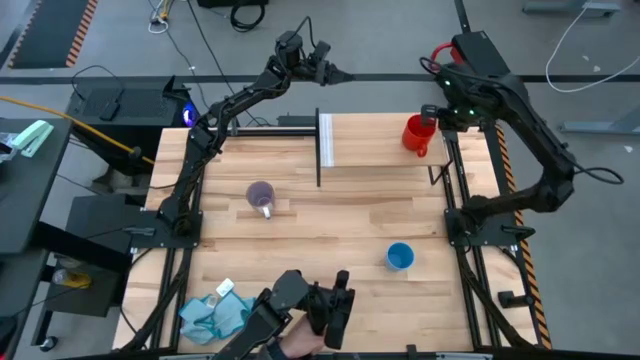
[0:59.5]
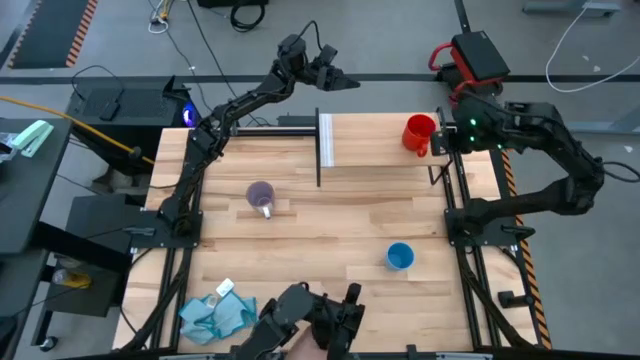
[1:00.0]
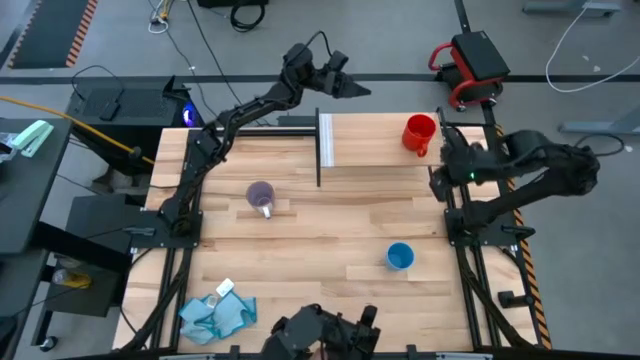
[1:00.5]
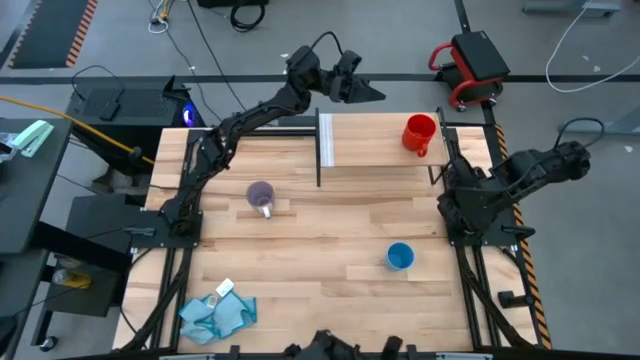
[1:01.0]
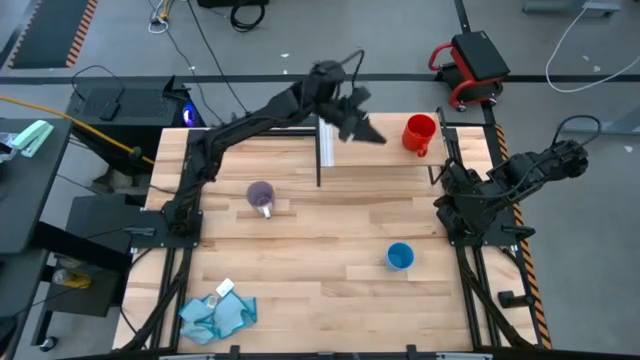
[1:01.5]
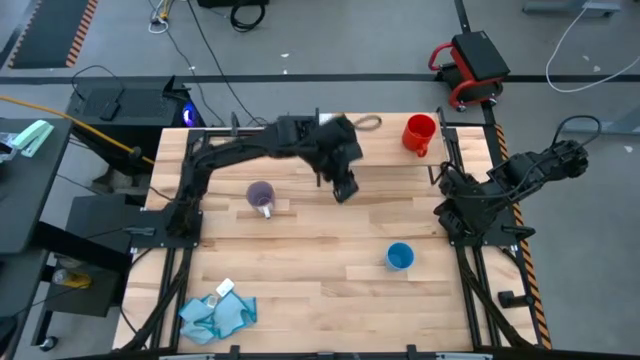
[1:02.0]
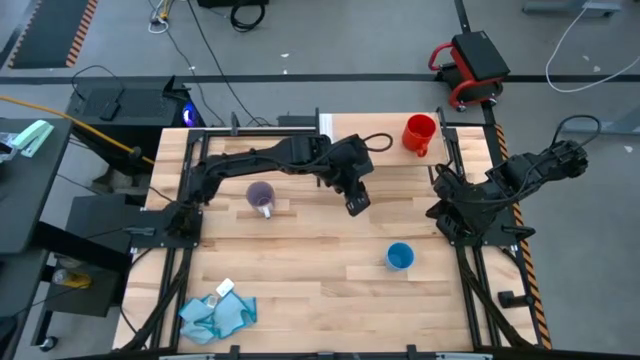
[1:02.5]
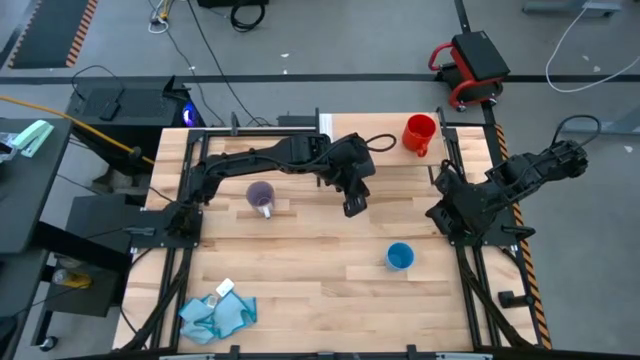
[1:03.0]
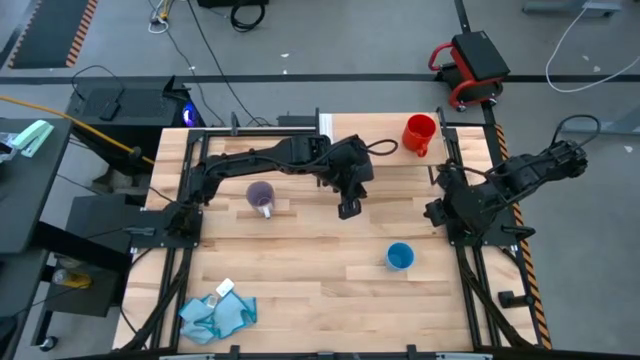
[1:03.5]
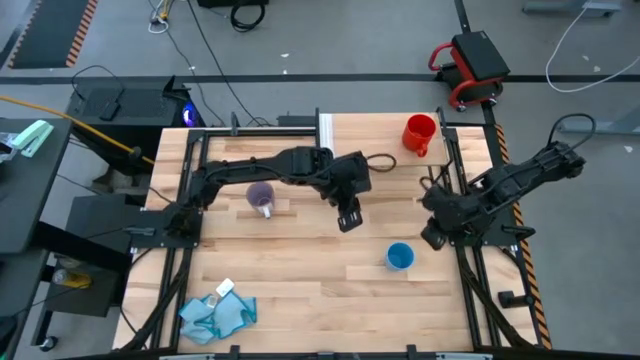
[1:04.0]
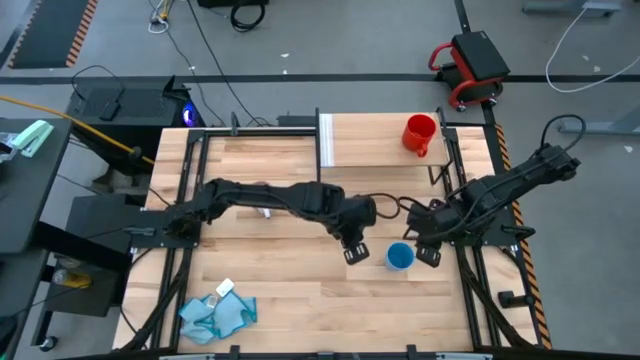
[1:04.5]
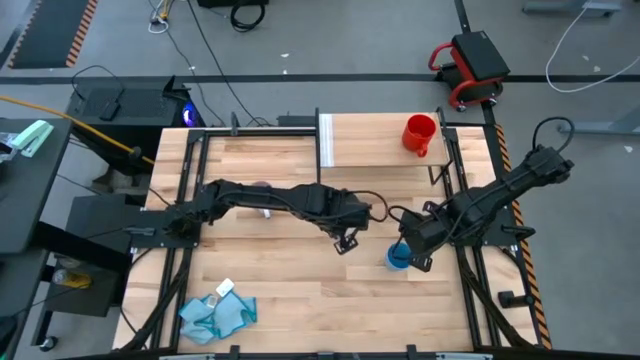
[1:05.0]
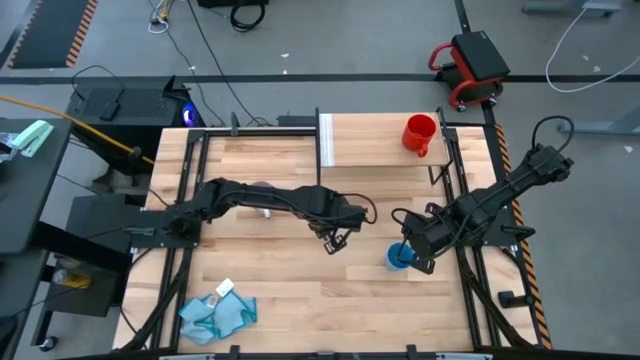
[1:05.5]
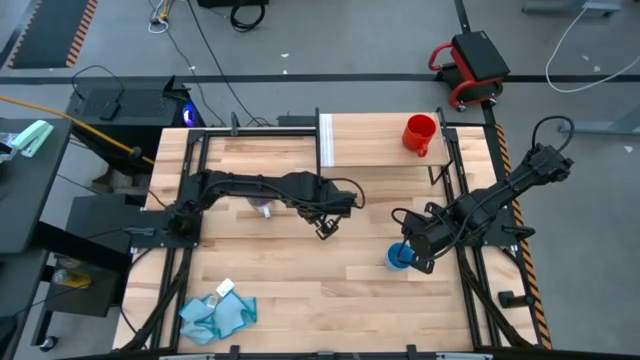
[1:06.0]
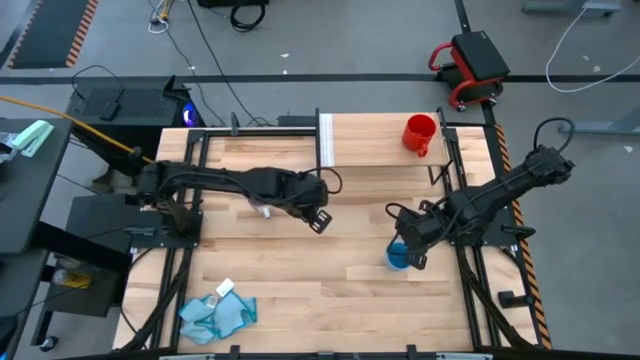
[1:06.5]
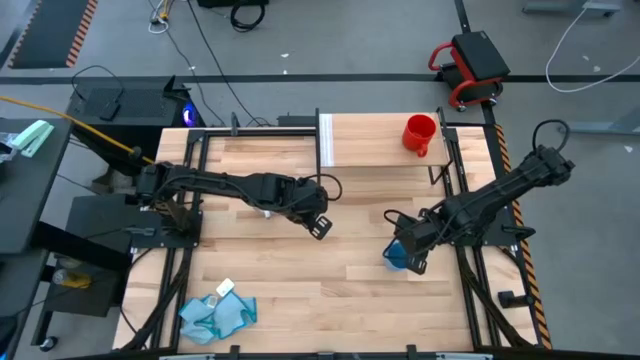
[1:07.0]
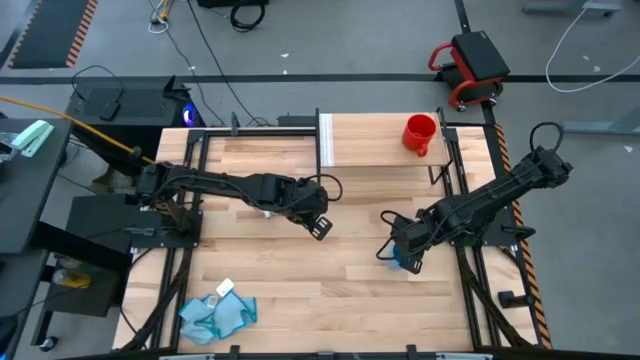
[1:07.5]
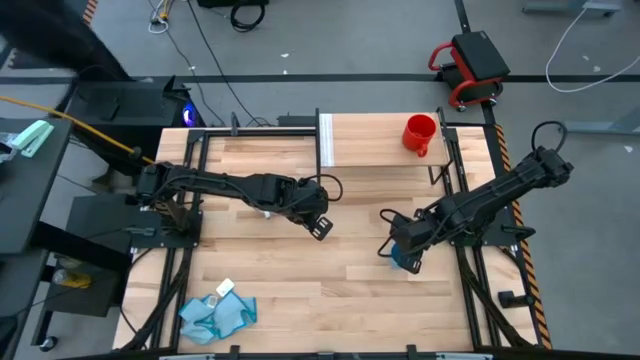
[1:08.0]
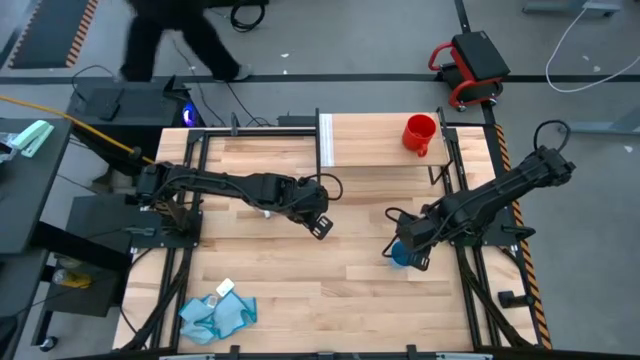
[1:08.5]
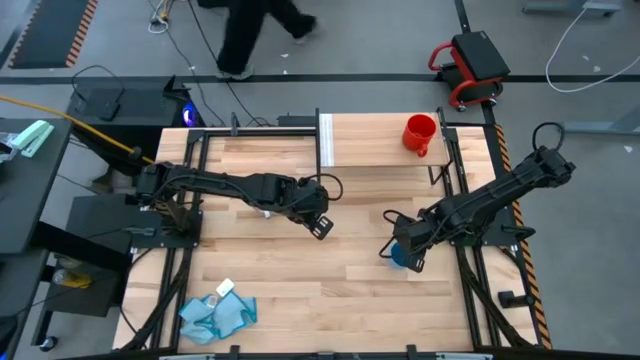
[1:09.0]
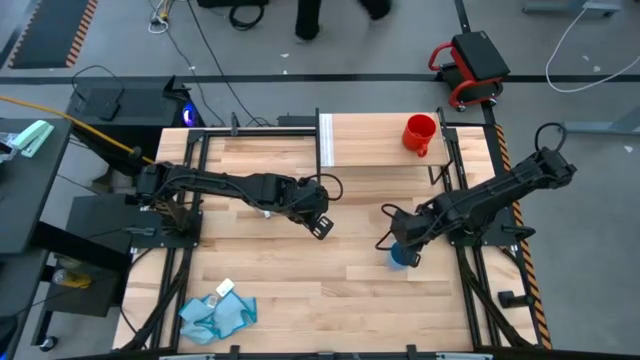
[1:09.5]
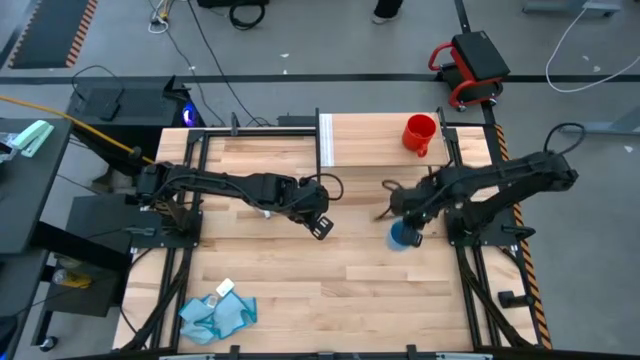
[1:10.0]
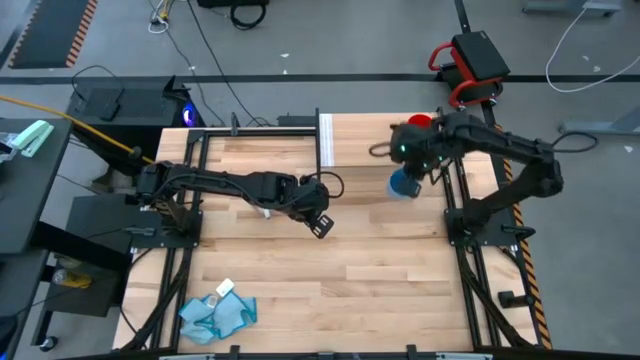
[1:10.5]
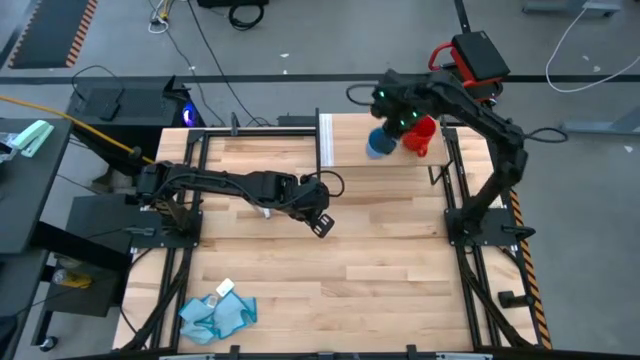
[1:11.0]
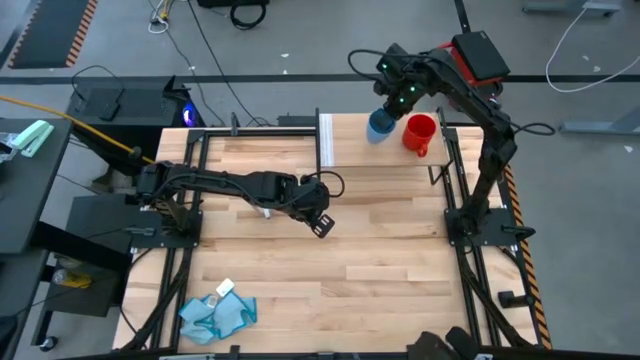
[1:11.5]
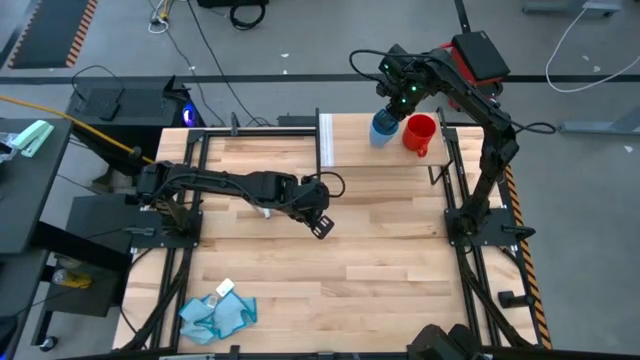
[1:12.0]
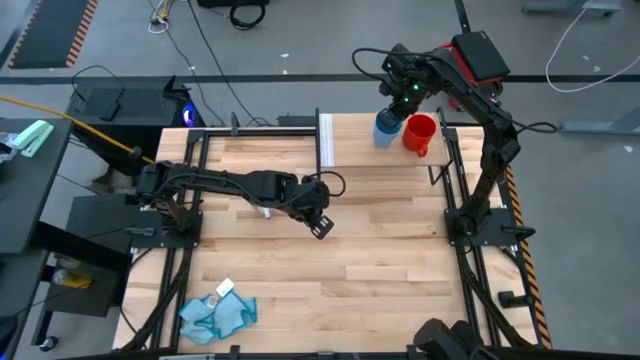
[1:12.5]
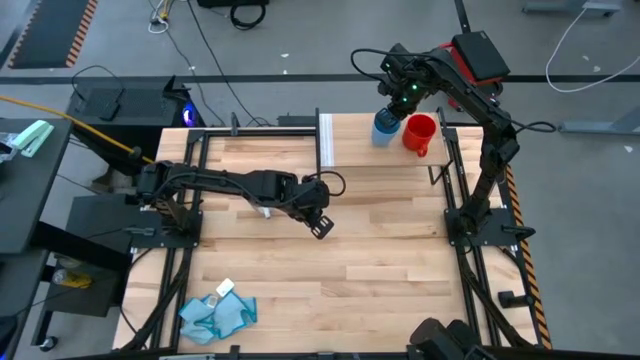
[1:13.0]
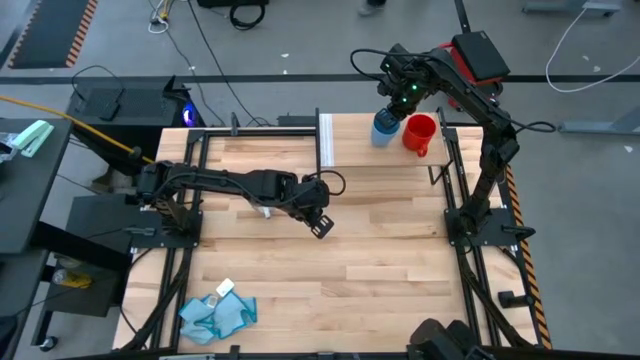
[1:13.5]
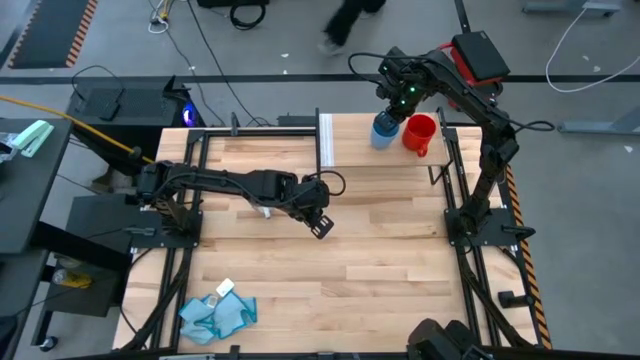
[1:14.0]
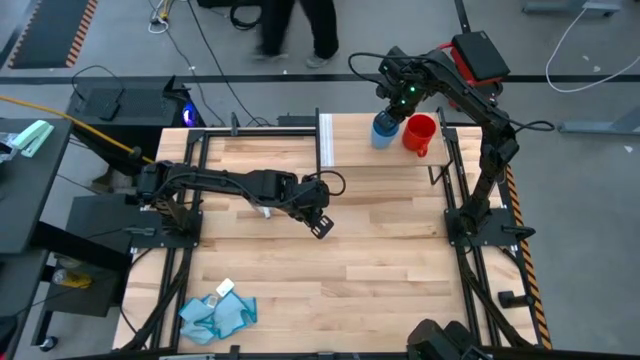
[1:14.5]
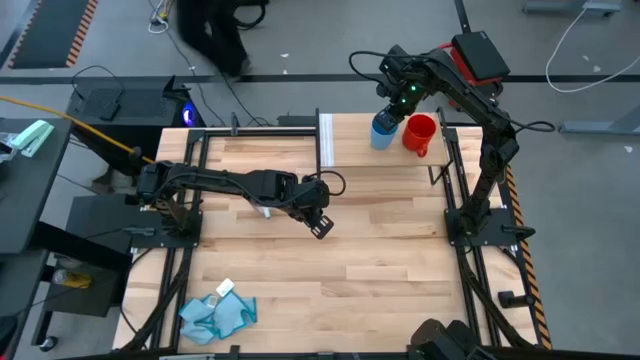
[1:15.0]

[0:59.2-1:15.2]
Task: Stack small to large cups/mugs on shelf
Put the blue cup on the shelf

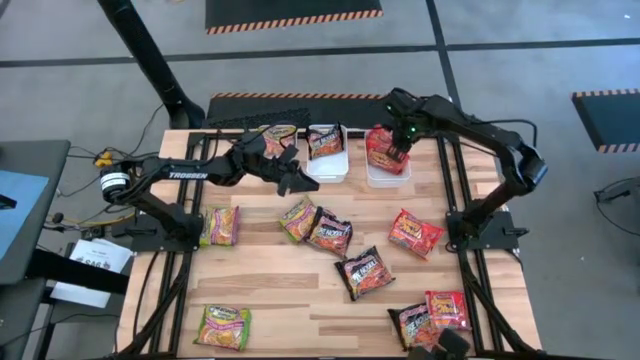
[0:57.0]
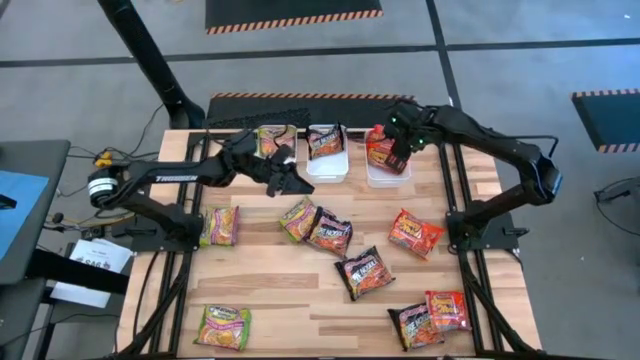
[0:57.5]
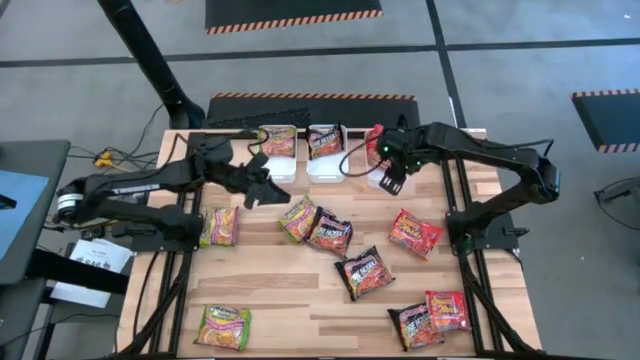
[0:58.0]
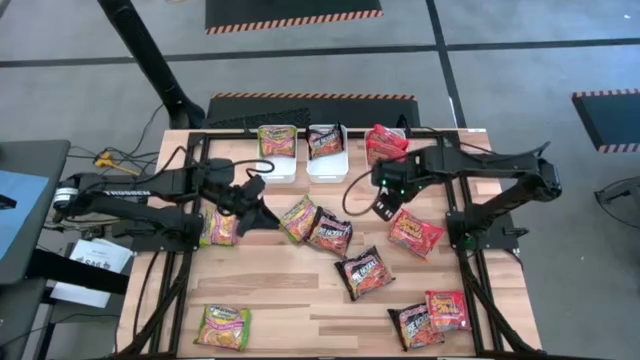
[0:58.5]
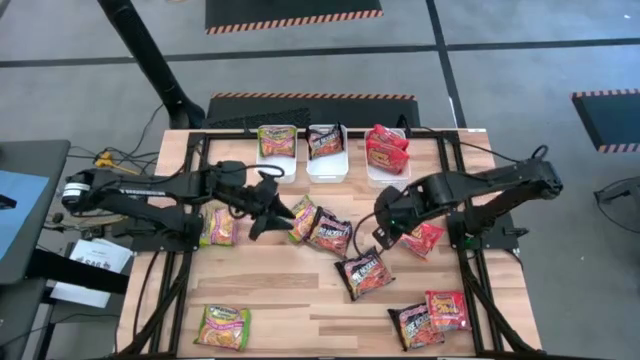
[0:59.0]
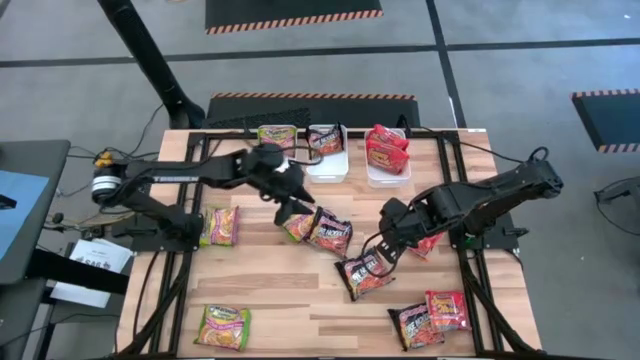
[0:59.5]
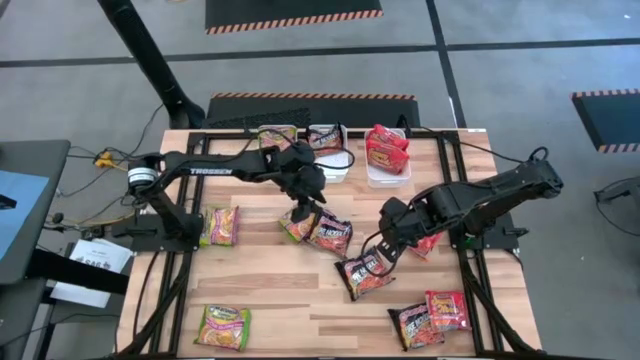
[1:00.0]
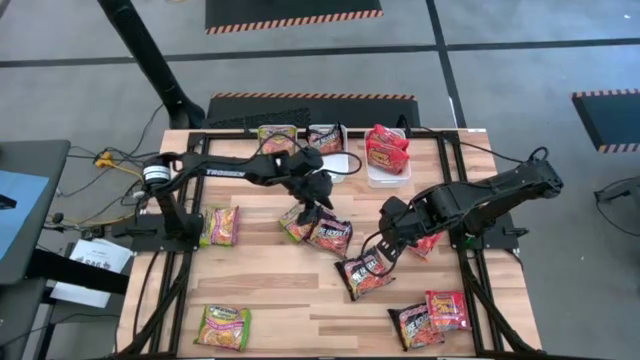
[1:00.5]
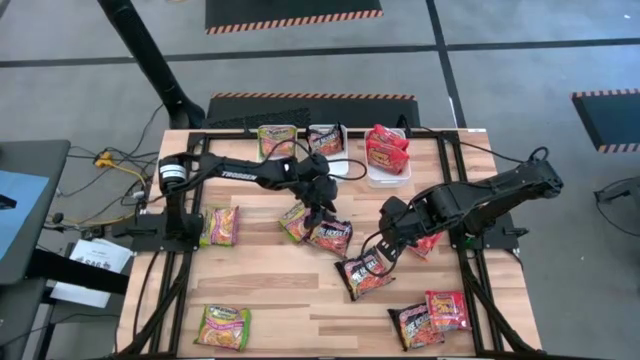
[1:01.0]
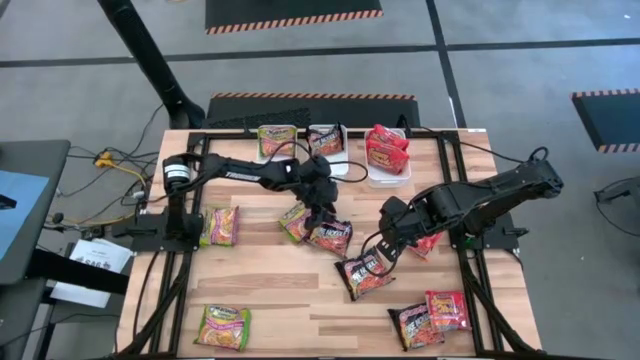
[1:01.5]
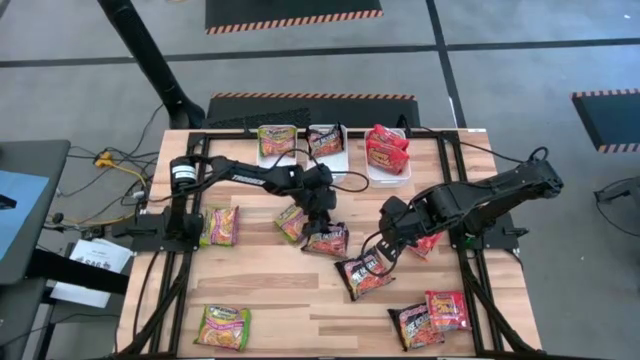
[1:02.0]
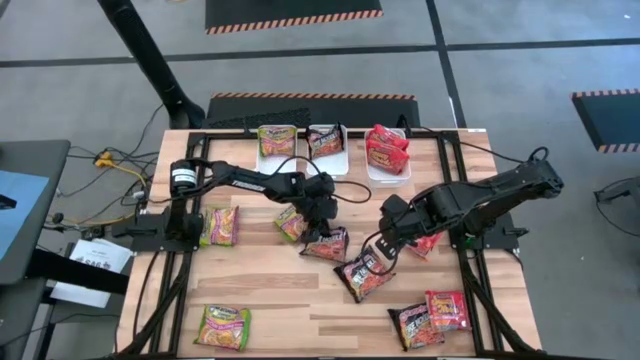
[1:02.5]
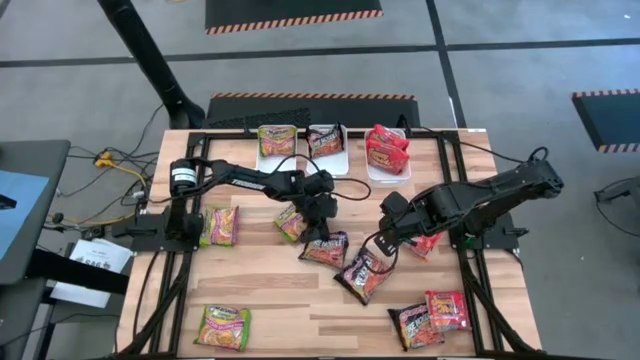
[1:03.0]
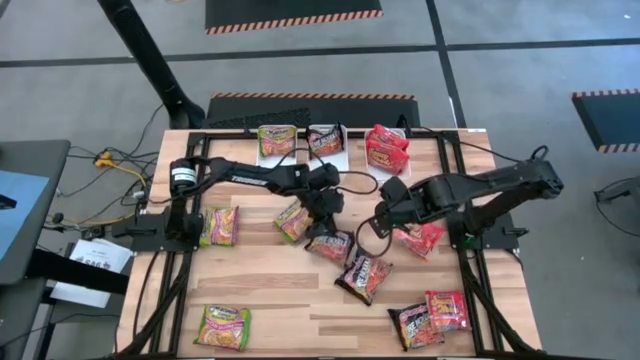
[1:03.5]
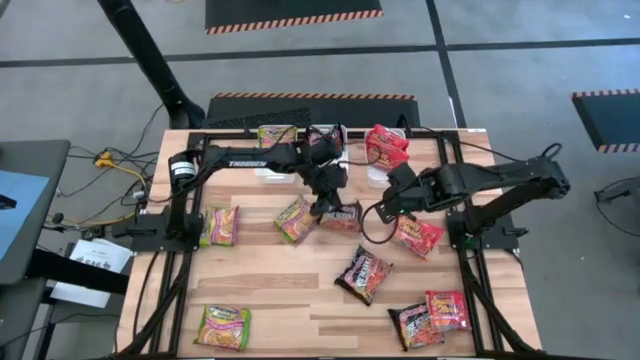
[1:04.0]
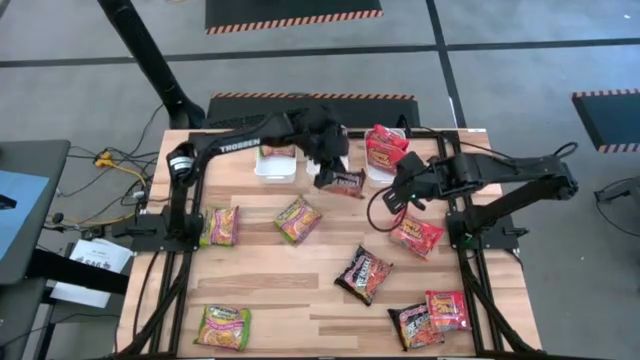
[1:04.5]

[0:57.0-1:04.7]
Task: Sort Maruchan noodles
Put the black noodle pack into the middle white bin
